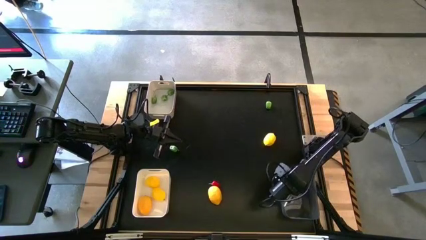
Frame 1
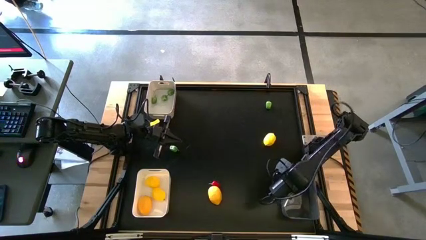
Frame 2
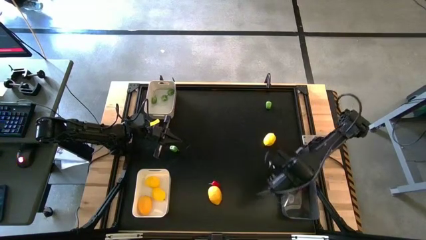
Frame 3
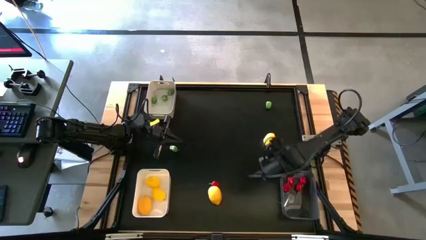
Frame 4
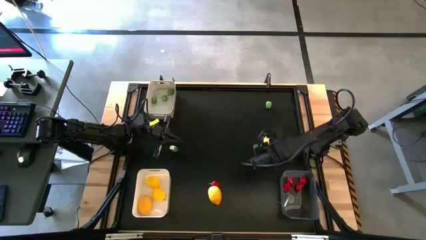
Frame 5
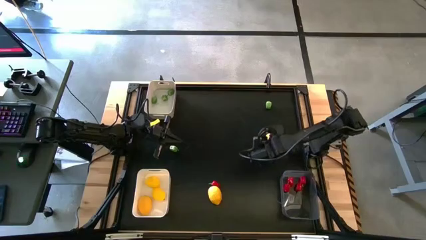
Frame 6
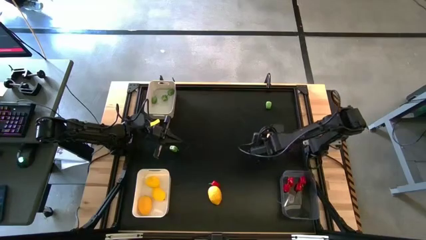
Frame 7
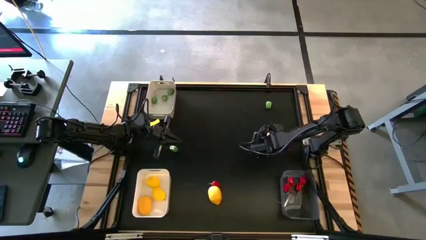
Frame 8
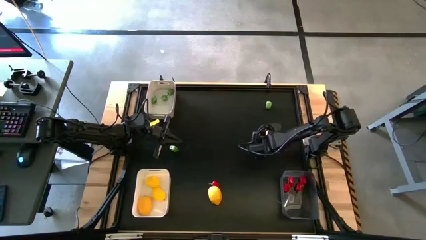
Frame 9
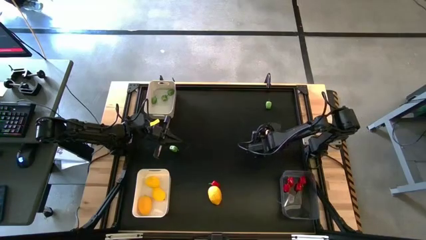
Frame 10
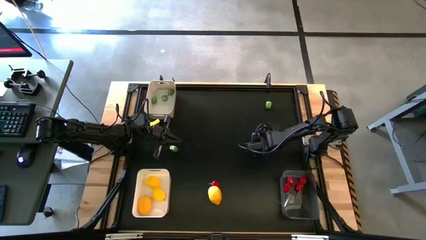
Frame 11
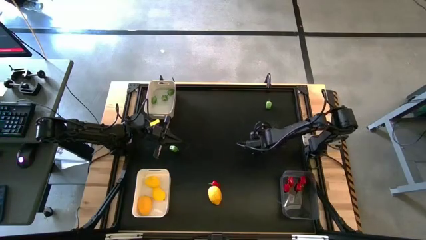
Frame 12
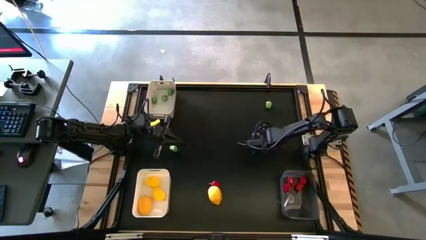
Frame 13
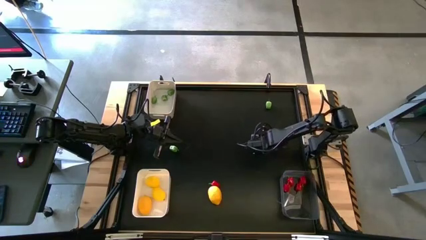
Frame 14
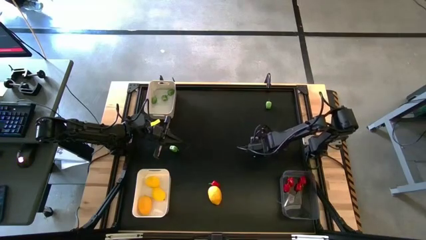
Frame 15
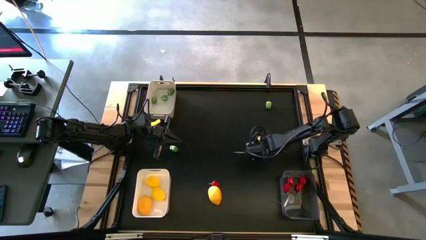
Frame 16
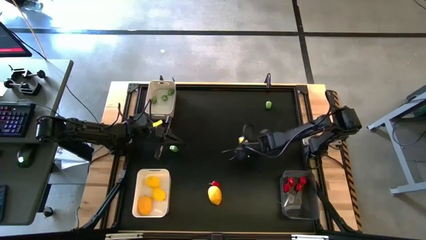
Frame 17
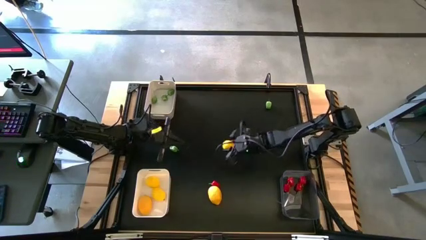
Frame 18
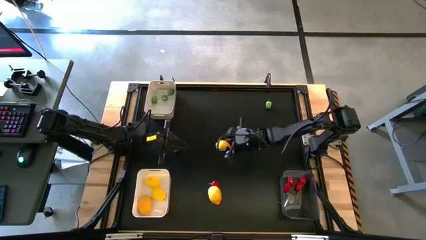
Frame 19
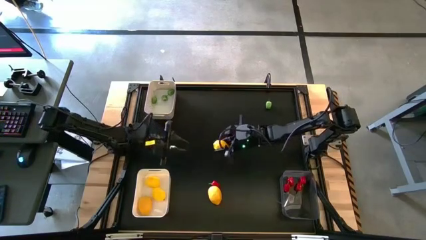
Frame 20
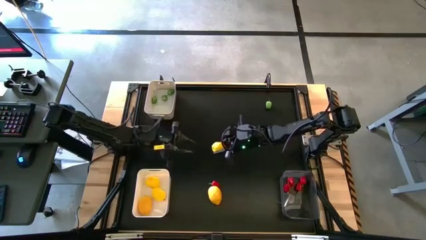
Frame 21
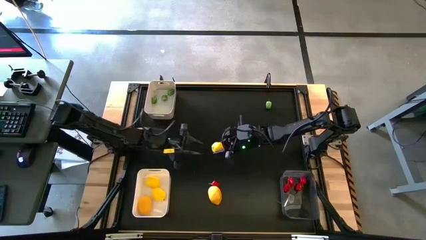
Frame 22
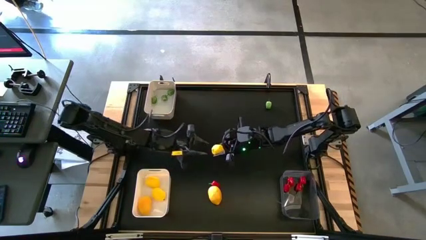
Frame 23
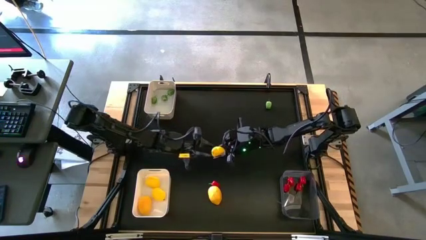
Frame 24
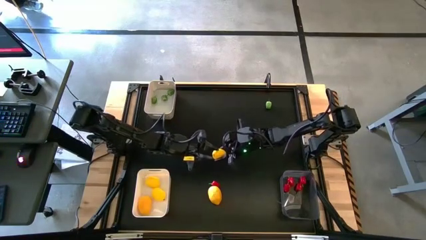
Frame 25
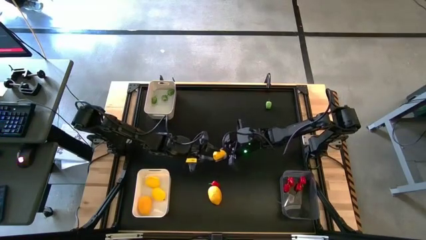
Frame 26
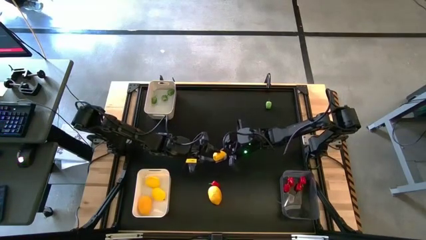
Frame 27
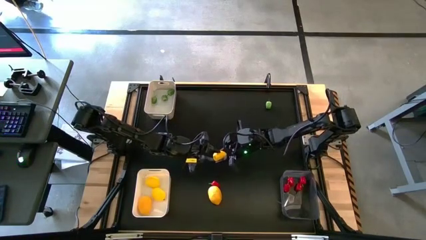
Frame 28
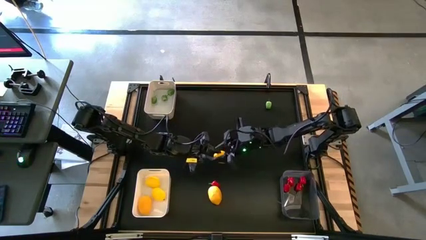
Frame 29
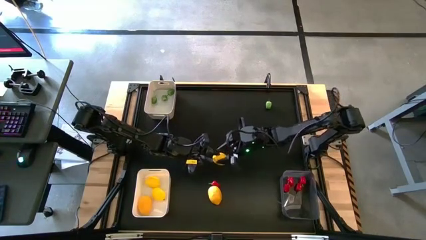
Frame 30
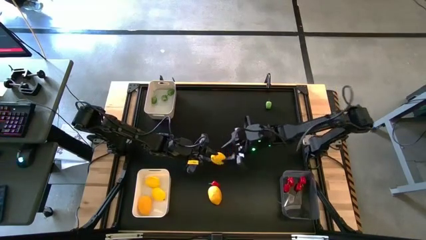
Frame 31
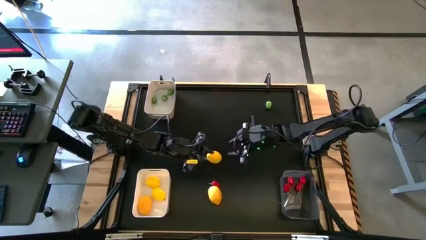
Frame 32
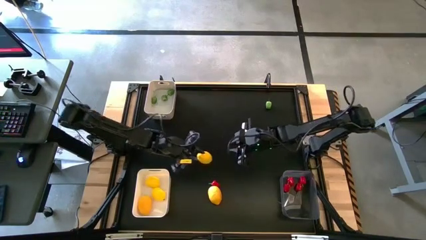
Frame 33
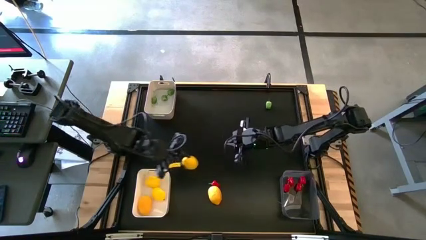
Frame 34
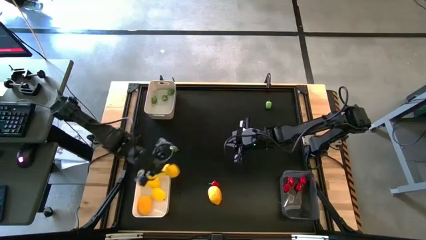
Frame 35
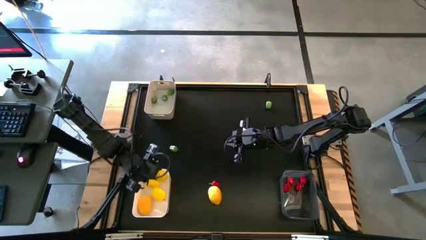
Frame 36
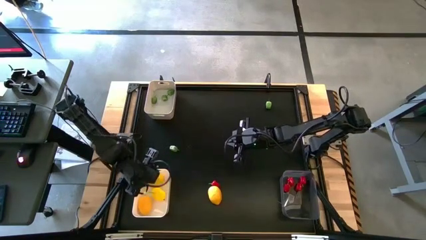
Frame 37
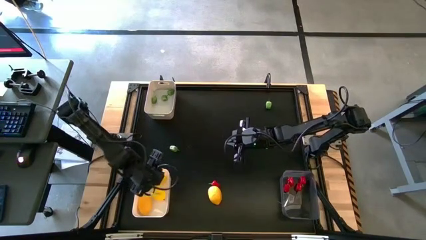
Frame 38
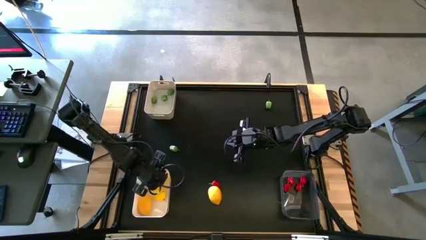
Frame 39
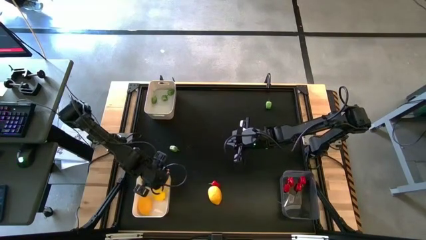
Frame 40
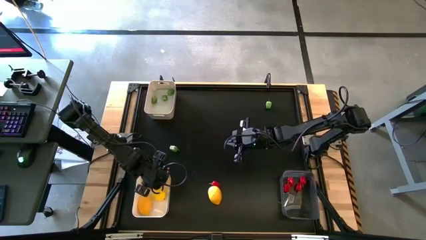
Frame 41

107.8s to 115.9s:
Task: Sort produce into baskets
Put the yellow lemon into the white bin

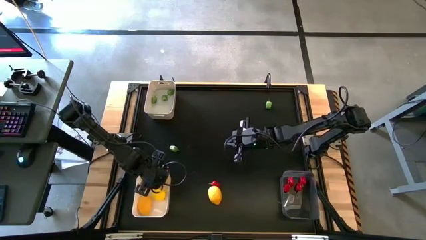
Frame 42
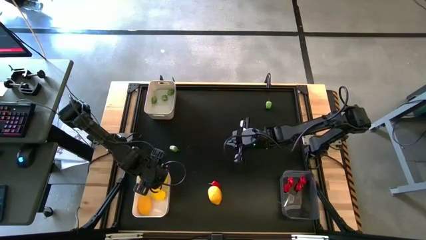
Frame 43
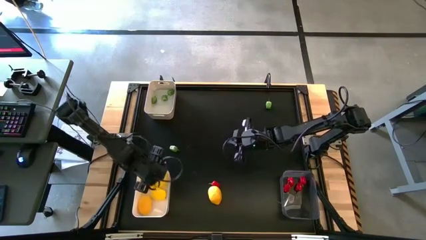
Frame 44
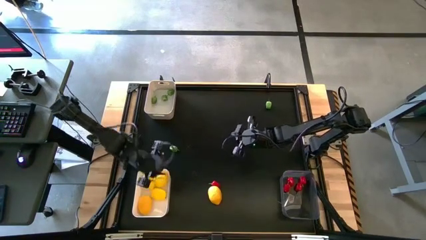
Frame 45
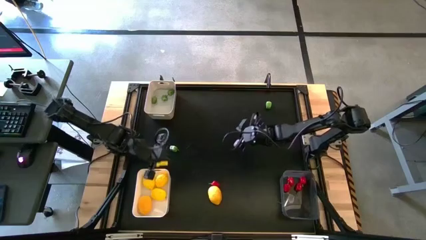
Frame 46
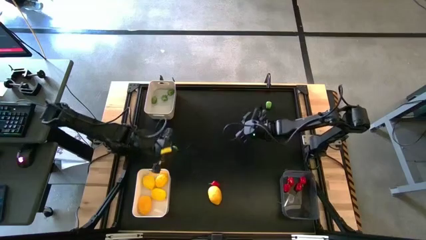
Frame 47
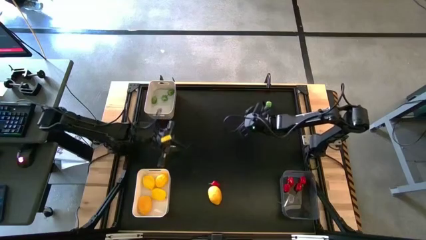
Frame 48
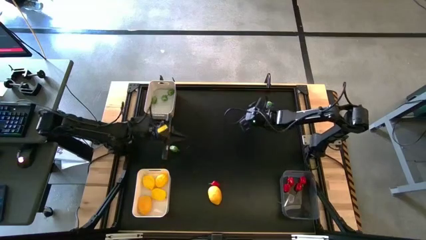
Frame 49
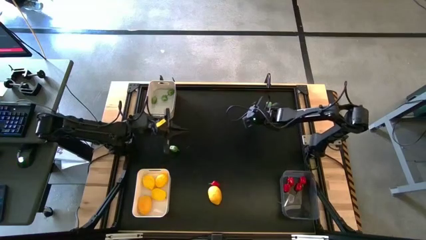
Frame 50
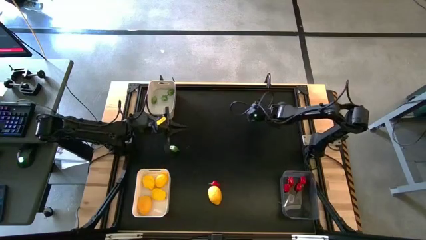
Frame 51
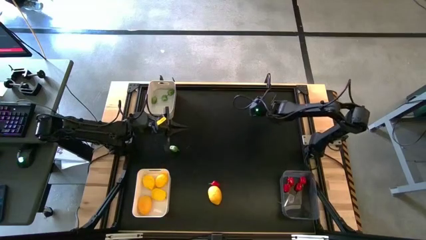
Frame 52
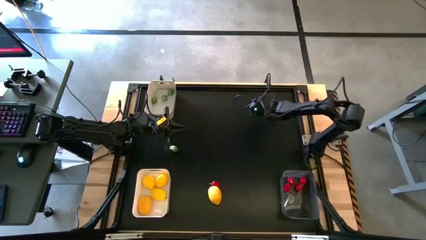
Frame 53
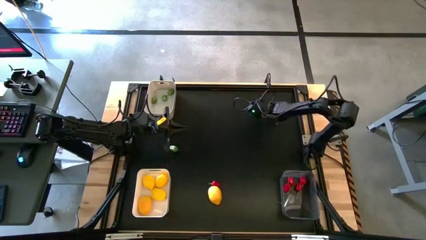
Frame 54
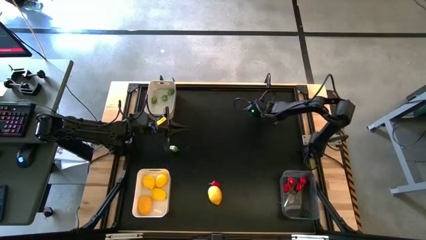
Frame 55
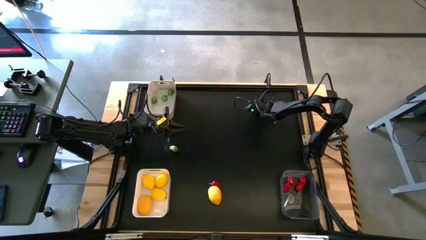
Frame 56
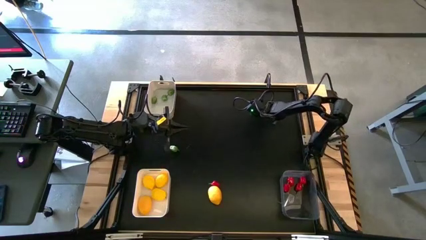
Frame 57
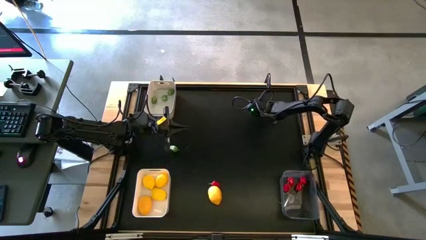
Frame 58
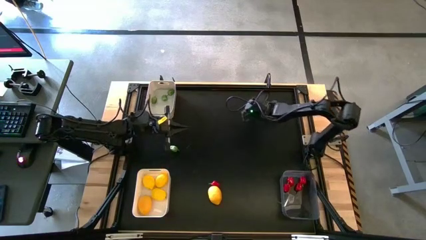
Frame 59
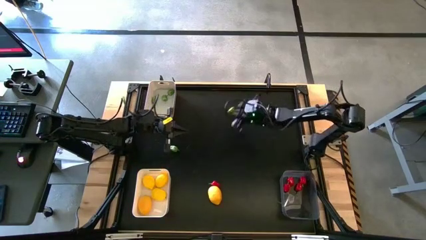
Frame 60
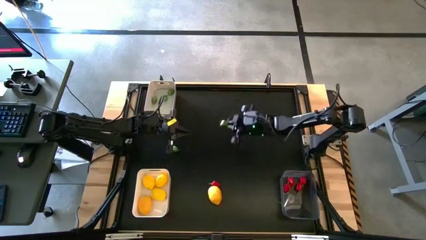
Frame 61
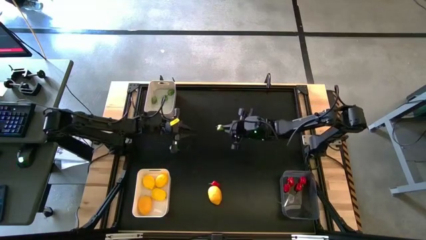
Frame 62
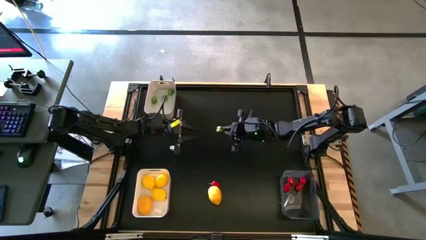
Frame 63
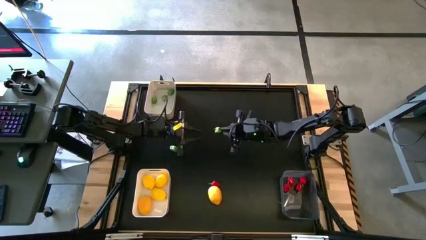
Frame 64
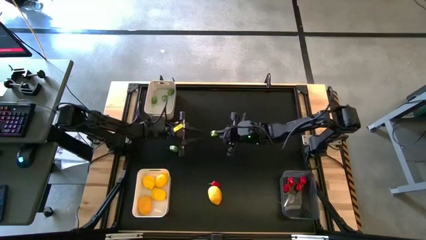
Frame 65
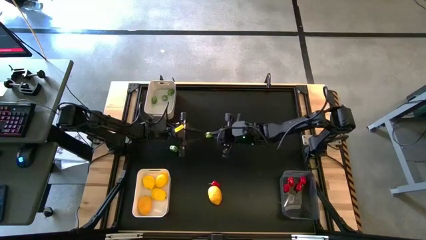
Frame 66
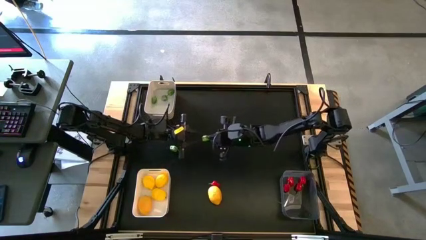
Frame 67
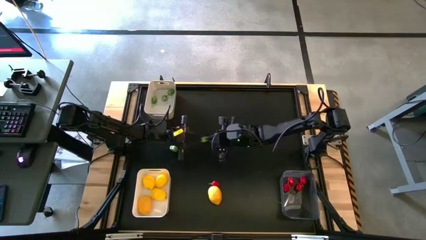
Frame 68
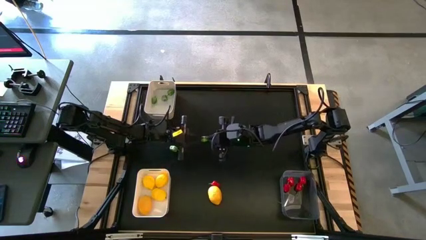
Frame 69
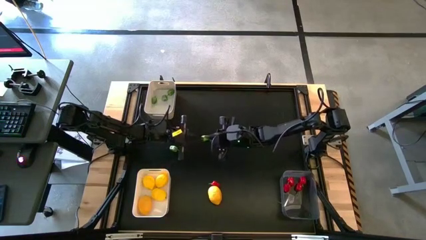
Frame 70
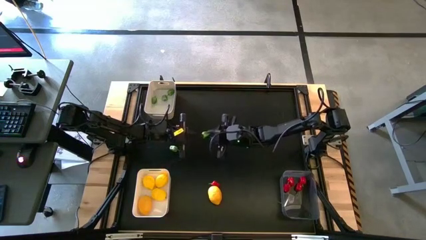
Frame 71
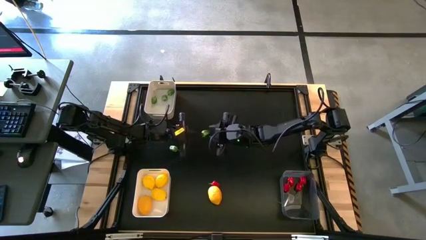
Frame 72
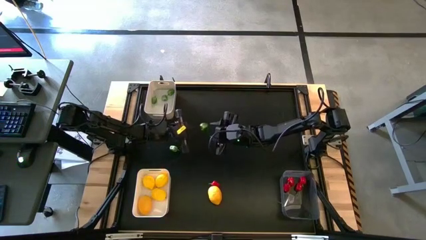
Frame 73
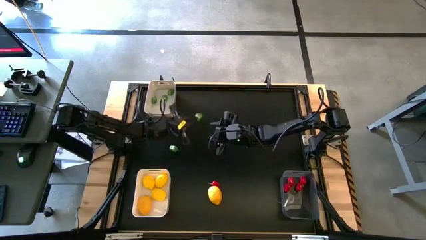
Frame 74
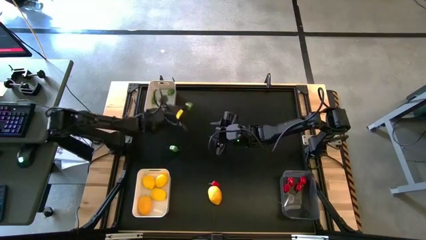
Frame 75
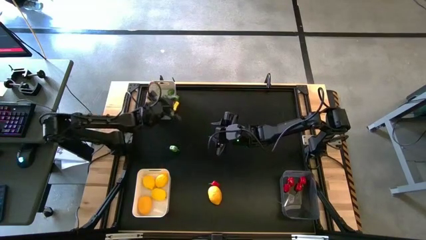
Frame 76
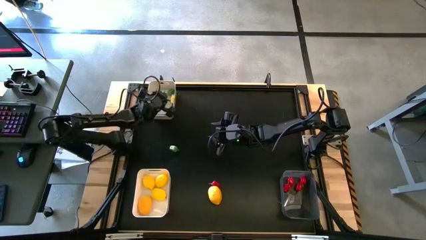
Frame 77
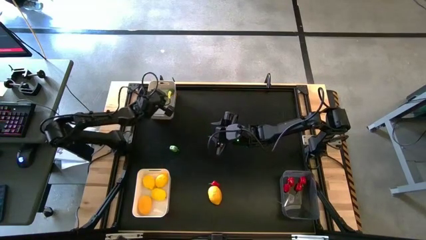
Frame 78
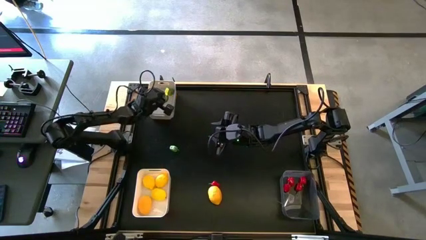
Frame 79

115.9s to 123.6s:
Put the green chili pepper into the gray bin

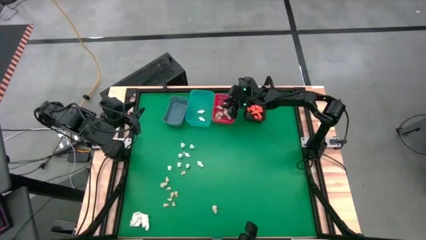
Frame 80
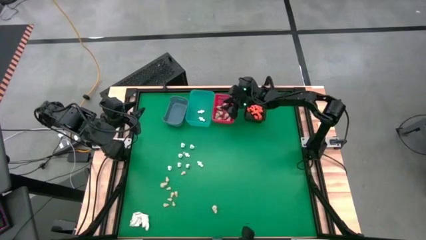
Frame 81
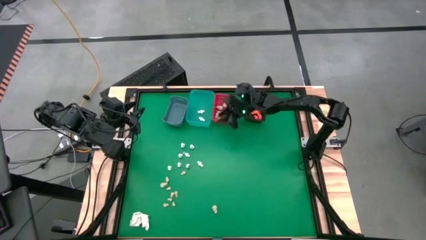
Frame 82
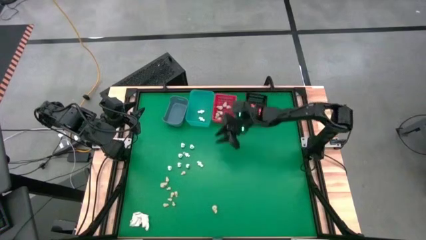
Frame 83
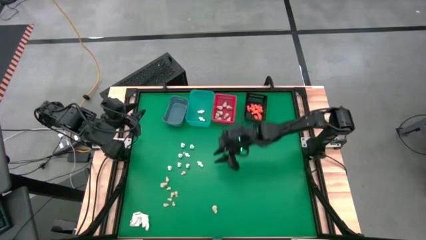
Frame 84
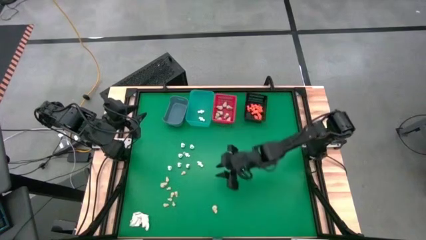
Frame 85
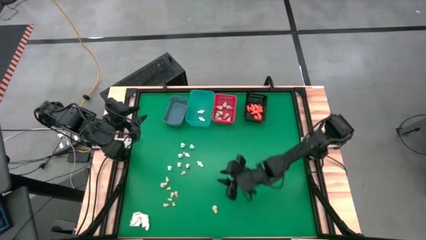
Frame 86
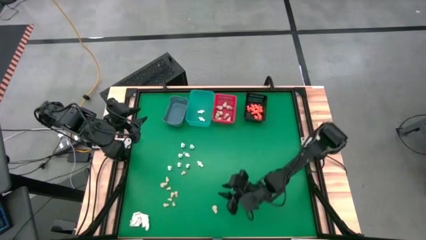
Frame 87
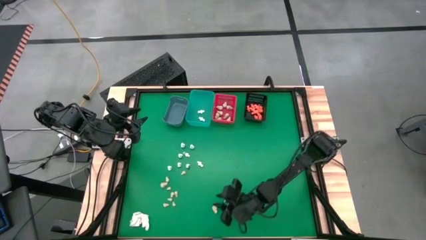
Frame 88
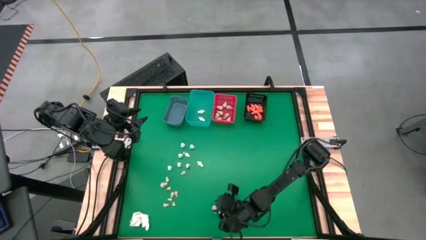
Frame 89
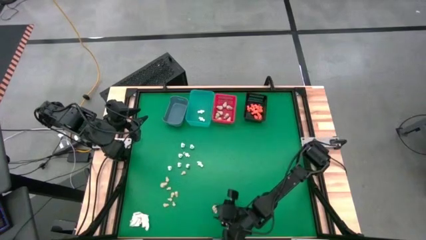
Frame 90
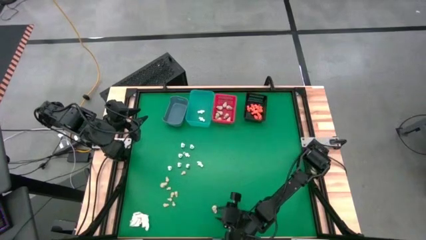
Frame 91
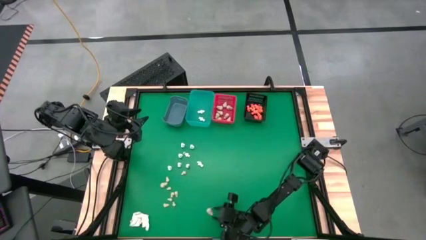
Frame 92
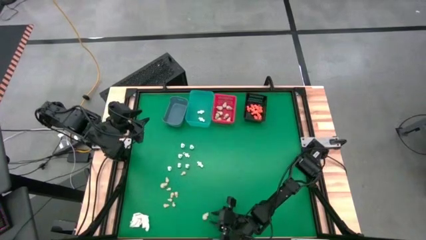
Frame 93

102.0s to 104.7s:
Task: Sort Halloween decoration
Put the white skull toy into the red bin
